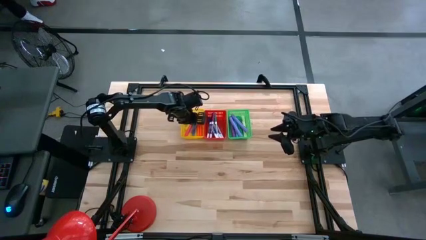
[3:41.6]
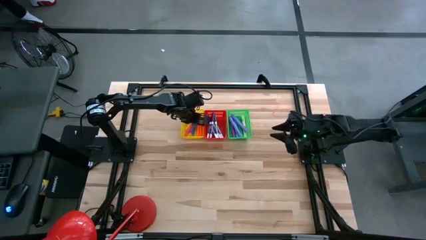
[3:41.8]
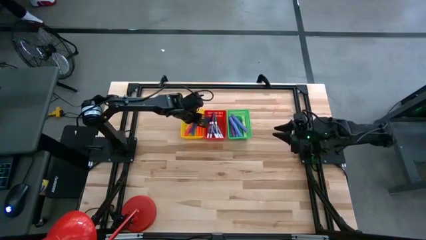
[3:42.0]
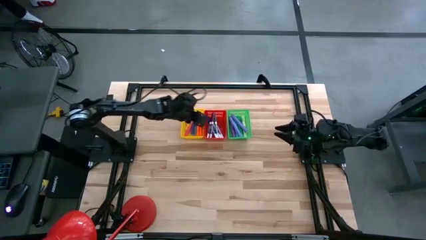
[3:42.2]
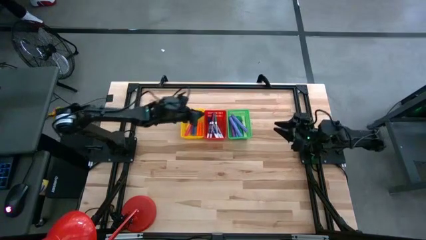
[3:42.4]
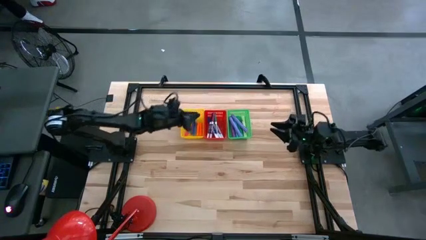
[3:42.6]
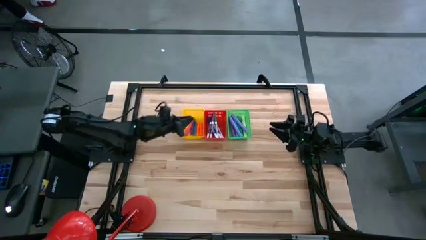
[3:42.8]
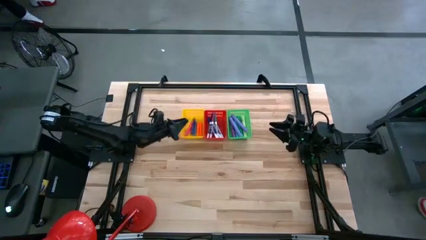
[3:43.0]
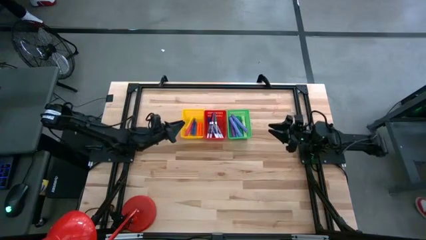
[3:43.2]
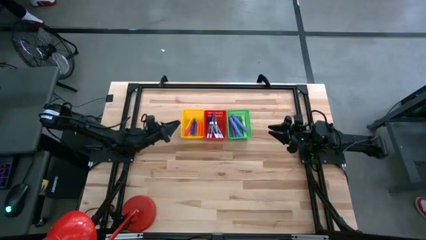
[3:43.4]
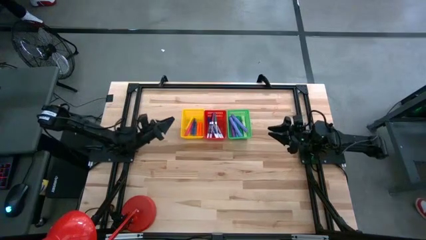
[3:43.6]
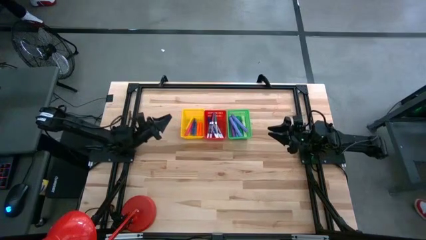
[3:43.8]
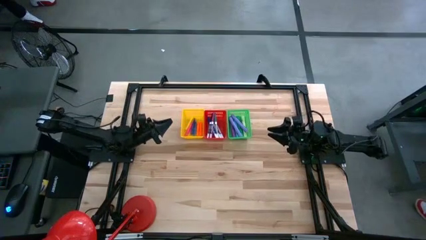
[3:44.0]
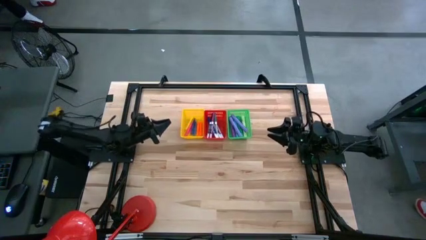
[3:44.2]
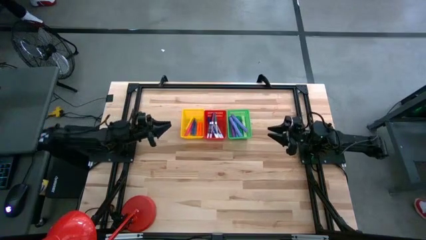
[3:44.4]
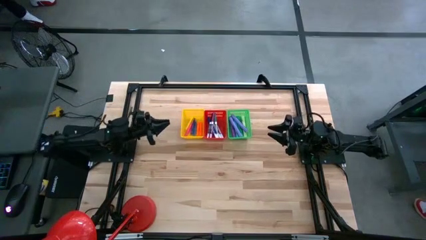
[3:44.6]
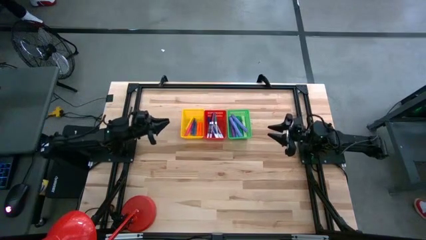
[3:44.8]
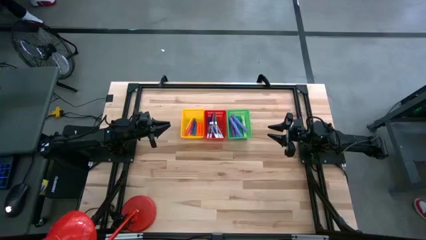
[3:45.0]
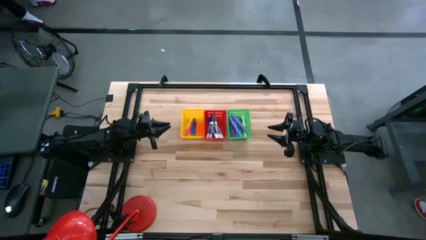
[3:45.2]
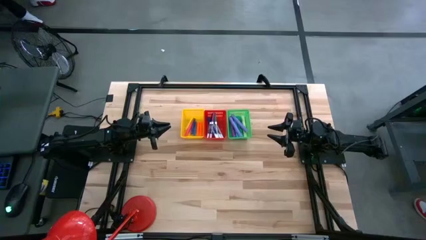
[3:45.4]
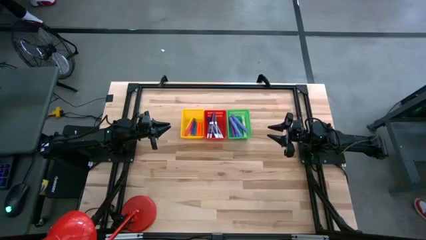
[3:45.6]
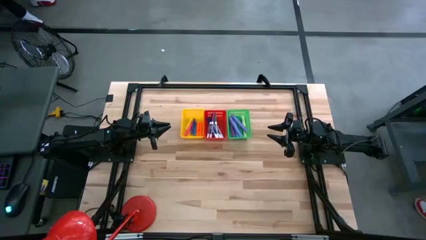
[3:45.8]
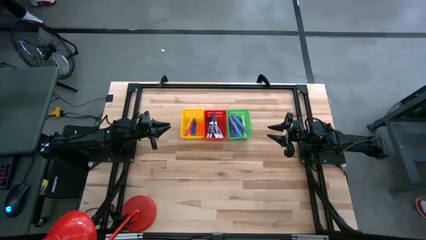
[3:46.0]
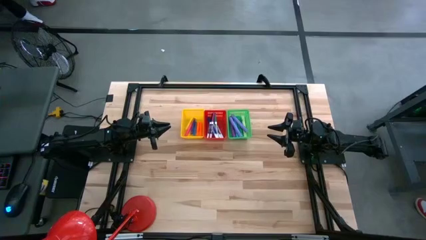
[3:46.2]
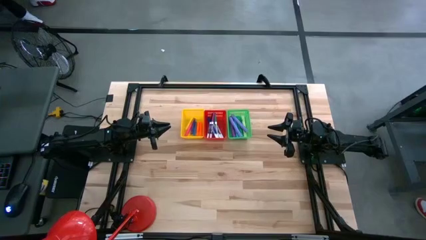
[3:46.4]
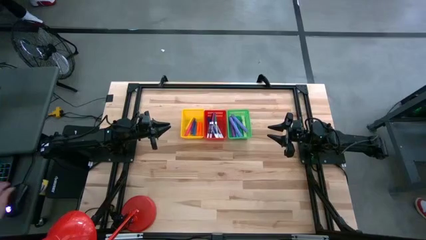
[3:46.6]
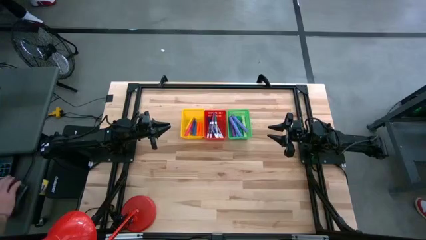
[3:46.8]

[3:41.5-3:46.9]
Task: Pick & Place Markers
Return to Home Position

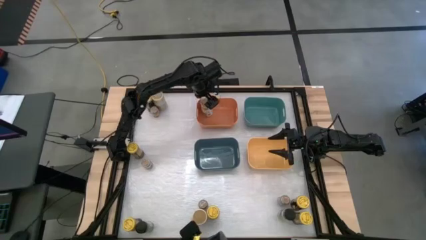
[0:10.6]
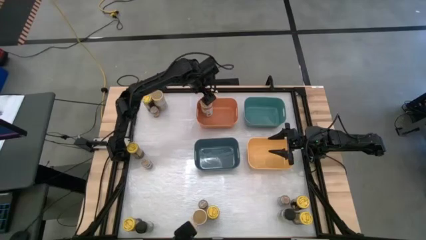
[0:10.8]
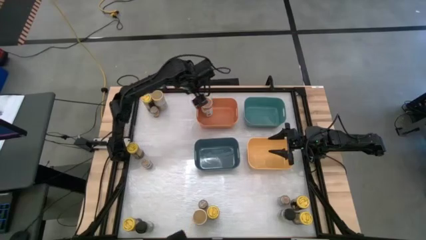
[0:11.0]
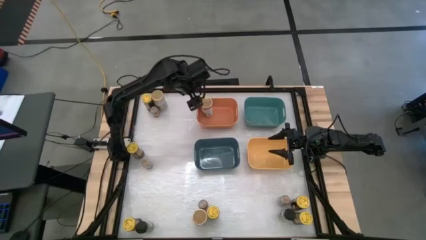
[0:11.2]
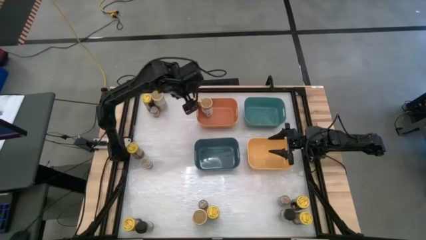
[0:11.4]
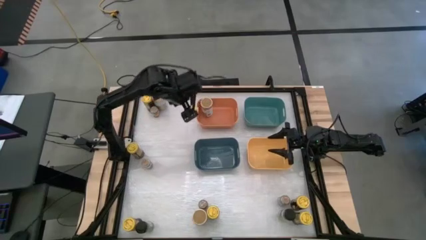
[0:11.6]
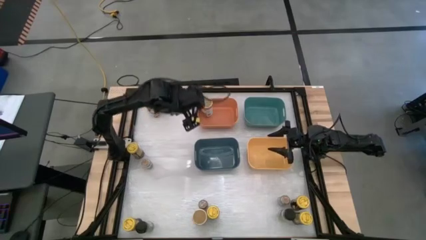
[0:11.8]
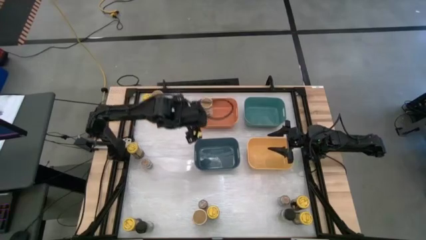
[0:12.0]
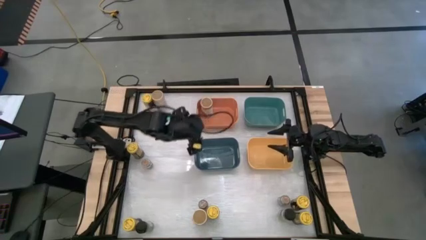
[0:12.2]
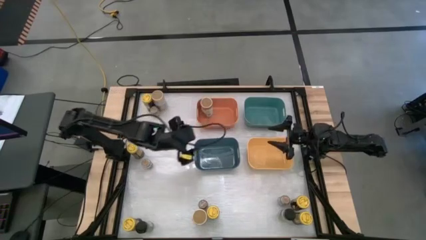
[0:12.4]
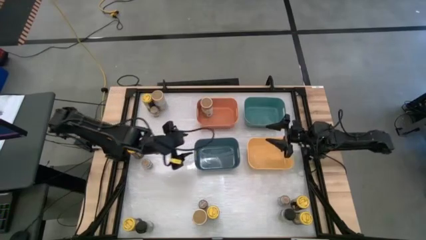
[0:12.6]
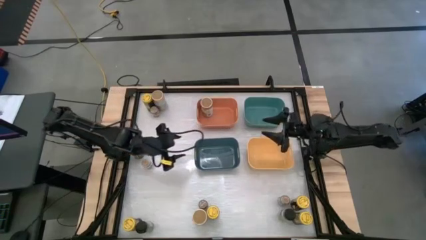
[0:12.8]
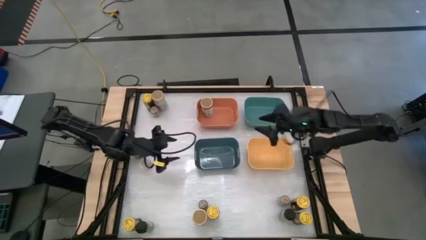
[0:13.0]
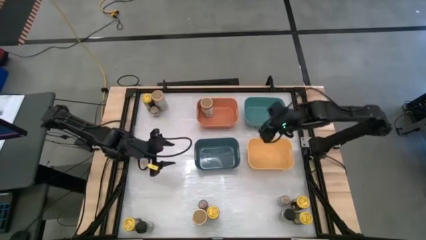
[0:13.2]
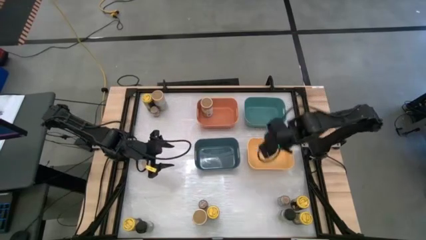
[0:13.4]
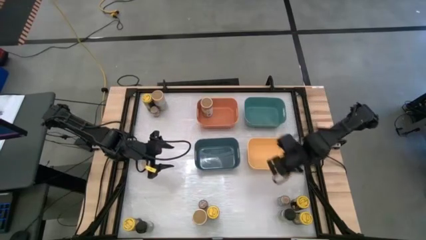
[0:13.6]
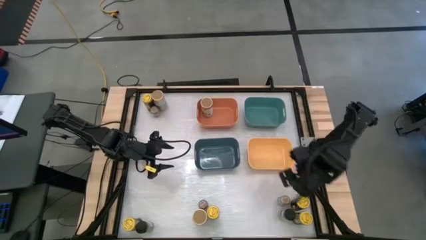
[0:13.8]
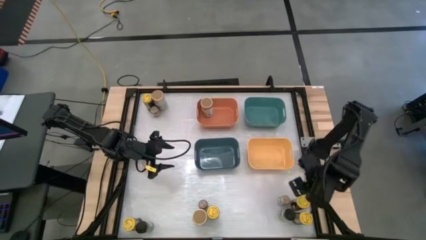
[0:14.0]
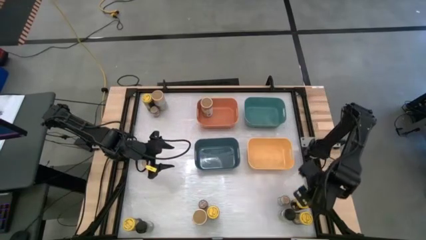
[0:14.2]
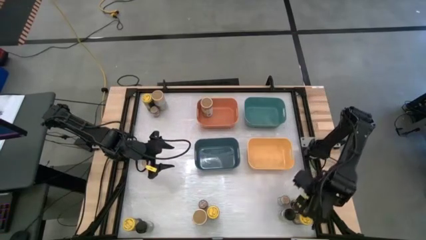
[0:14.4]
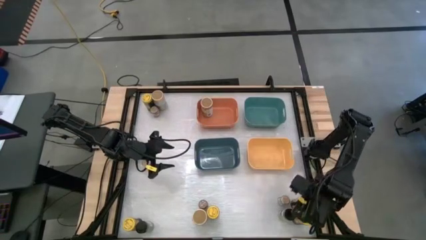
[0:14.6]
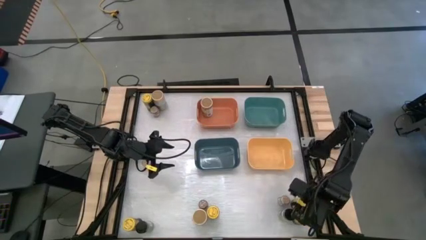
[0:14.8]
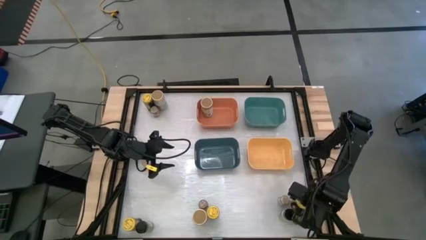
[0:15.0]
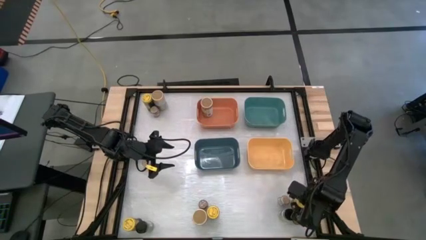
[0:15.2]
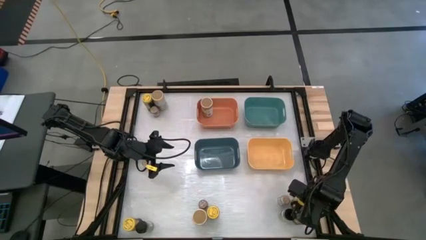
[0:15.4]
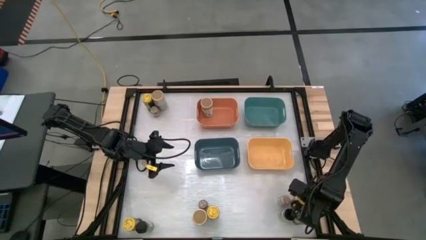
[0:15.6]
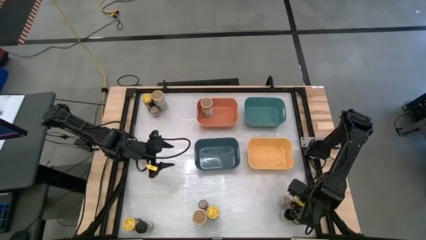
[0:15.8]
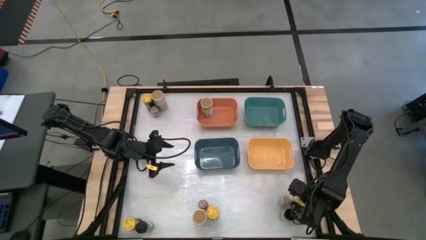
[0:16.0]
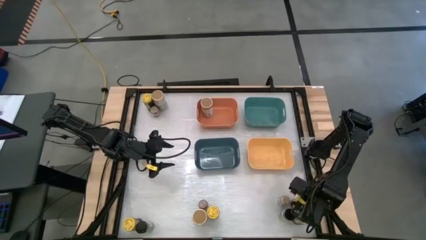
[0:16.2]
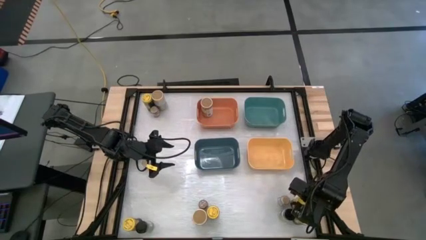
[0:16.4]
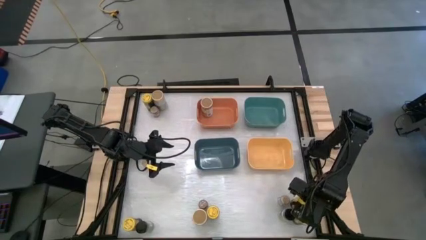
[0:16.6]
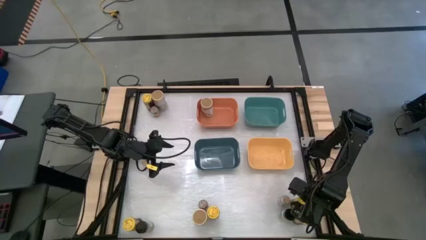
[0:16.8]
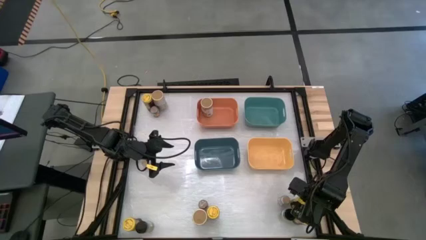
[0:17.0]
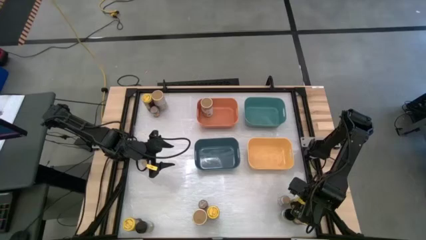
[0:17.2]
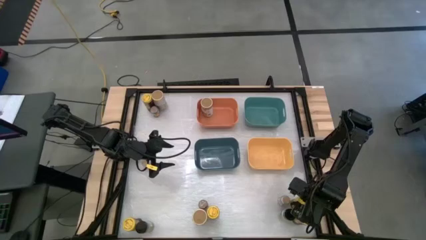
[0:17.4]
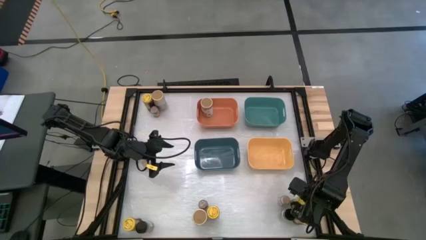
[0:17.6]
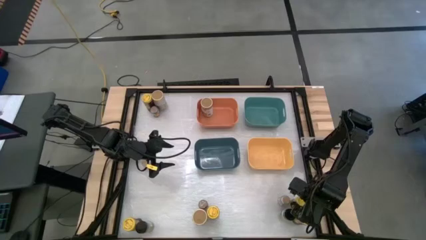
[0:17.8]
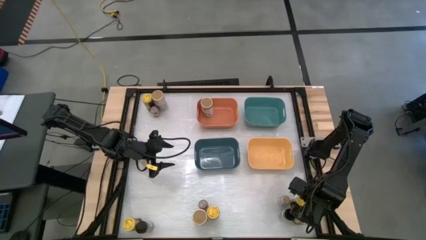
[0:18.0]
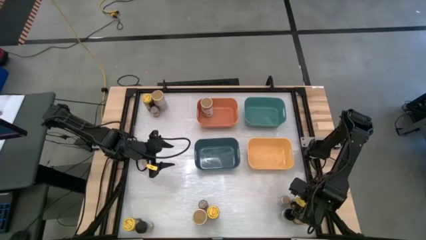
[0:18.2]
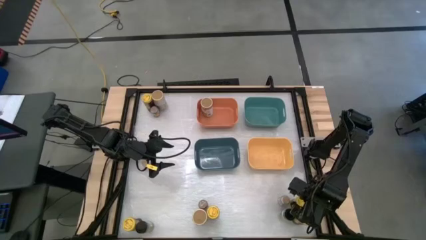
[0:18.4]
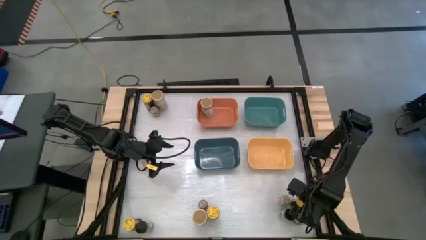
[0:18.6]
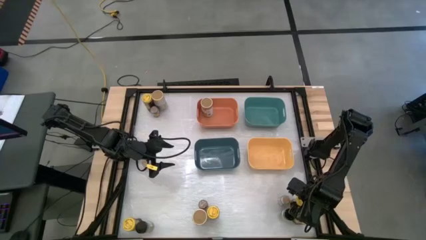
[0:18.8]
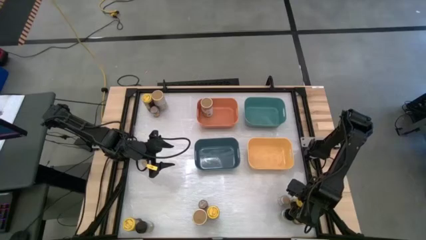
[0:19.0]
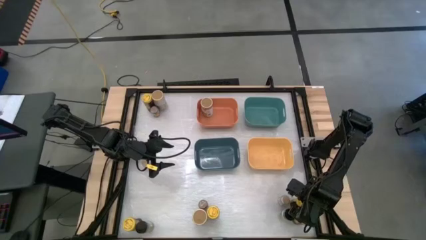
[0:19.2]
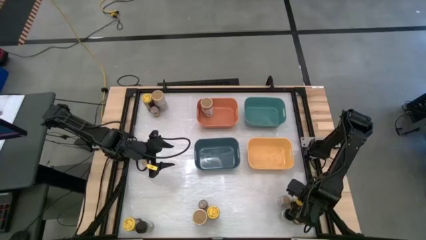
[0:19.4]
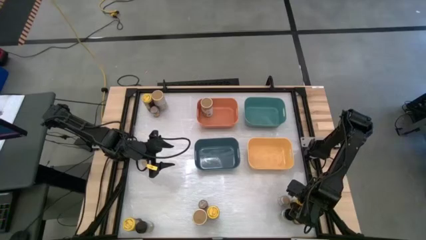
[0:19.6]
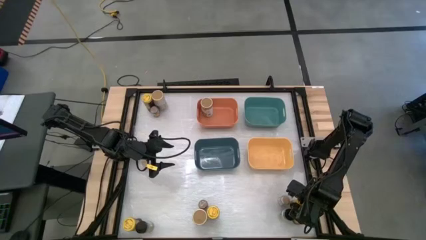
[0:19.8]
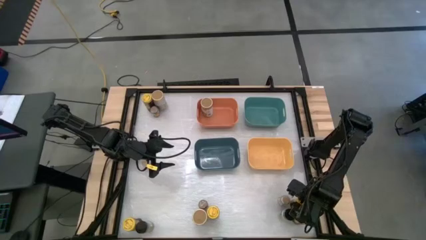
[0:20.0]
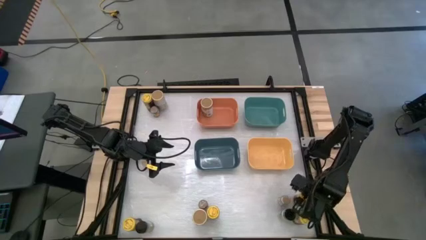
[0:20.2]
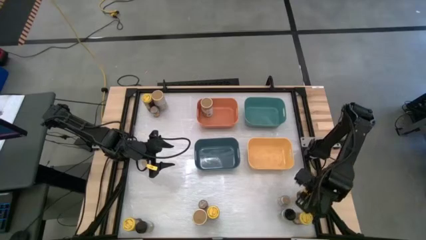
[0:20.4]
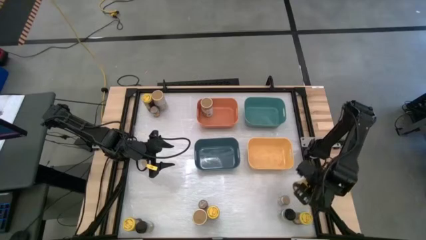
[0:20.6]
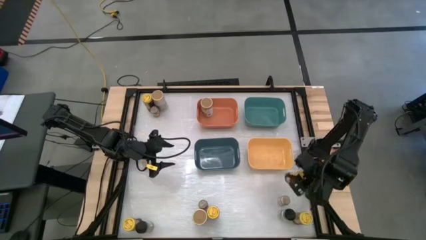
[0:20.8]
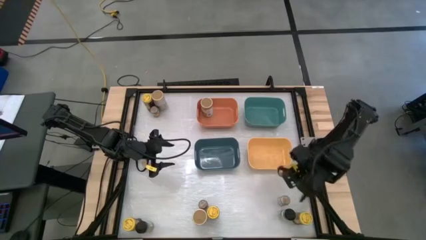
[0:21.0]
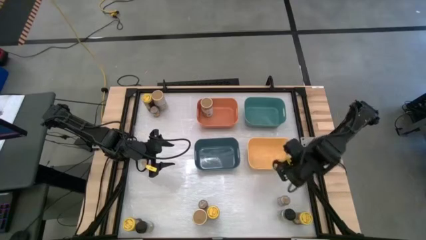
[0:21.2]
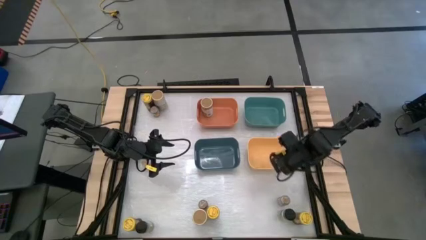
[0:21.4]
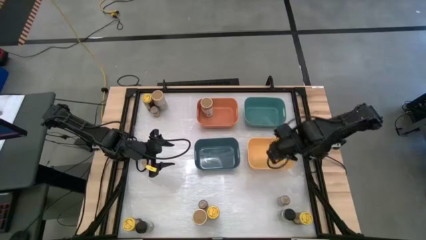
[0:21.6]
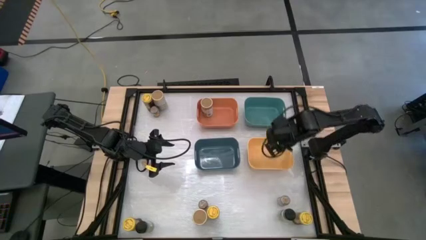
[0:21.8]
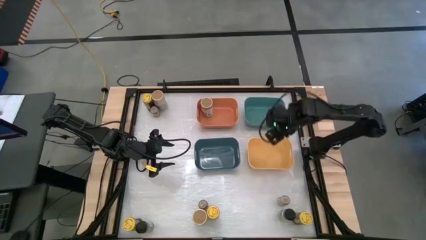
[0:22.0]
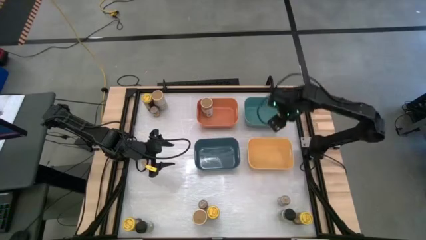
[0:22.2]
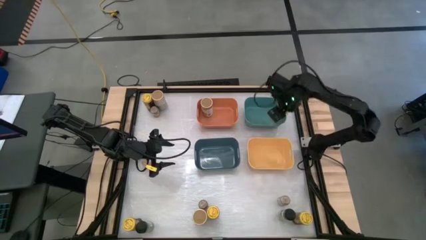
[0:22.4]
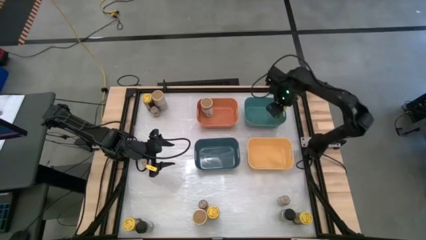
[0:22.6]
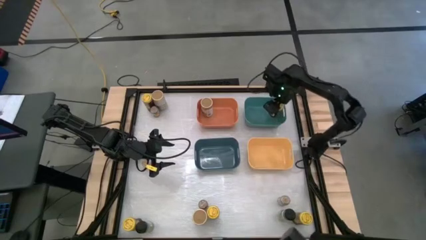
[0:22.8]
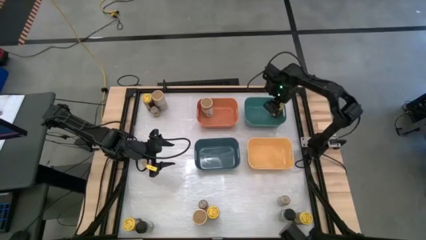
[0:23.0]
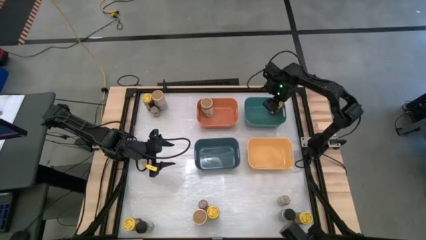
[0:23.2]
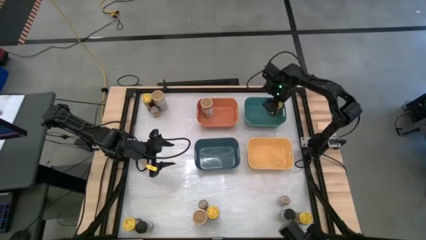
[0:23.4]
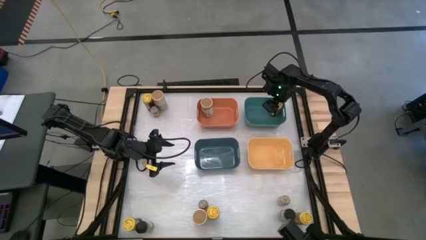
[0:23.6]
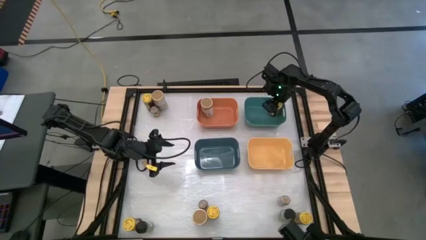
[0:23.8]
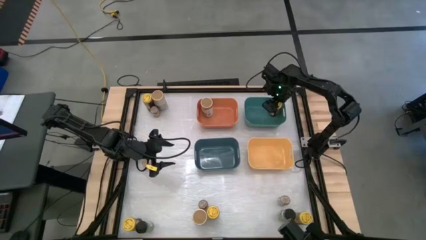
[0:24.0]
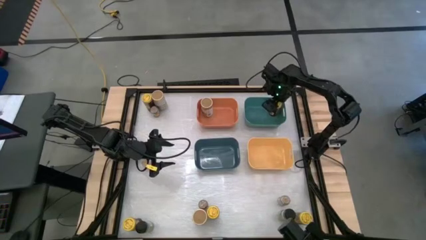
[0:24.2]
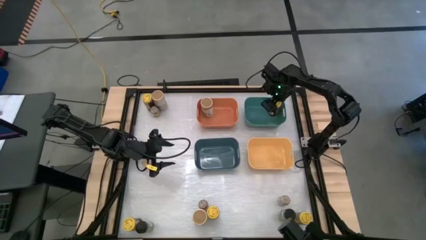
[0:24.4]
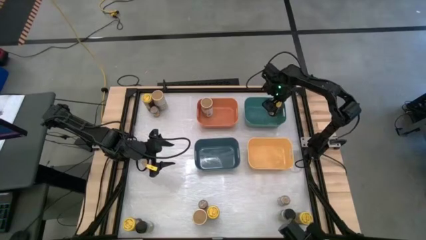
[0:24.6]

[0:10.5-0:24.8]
Task: Sort spices by type
Put the yellow spice bottle into the green bin
